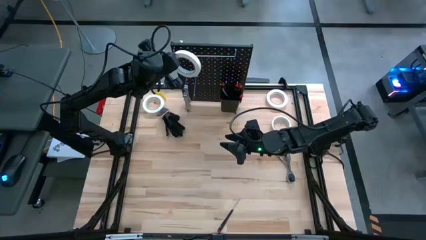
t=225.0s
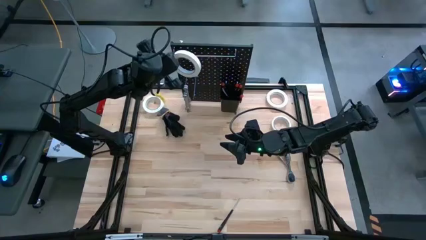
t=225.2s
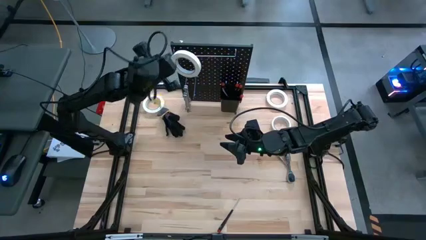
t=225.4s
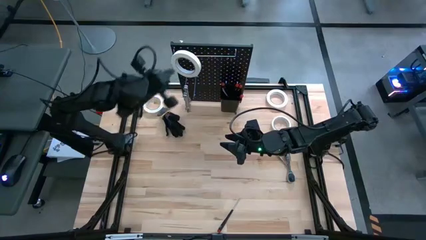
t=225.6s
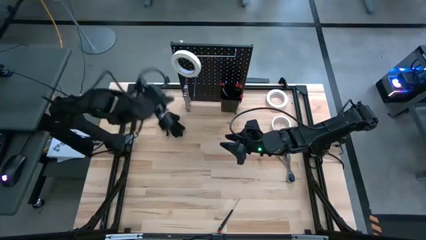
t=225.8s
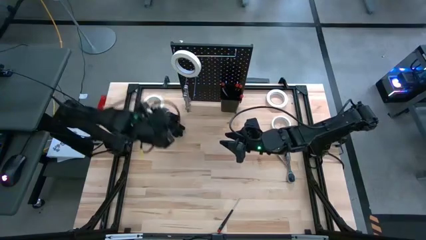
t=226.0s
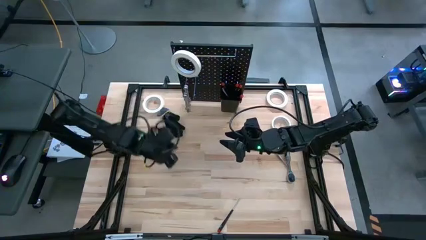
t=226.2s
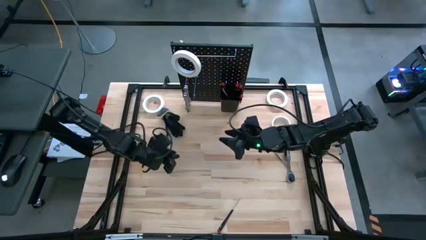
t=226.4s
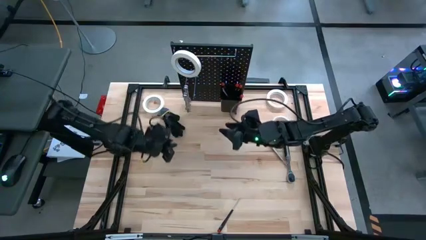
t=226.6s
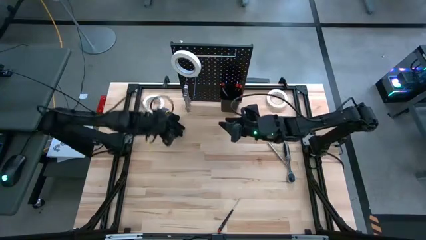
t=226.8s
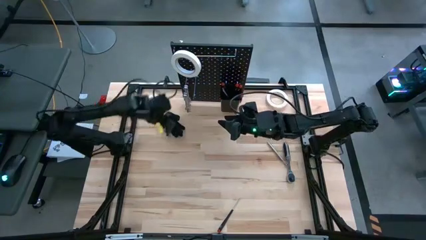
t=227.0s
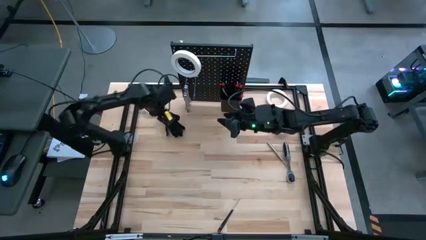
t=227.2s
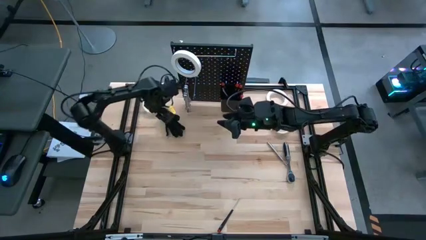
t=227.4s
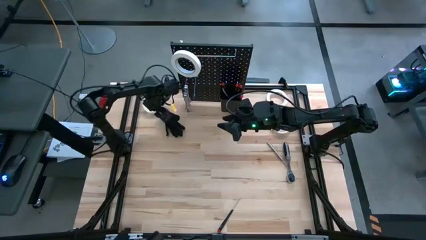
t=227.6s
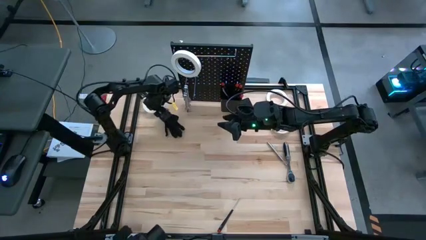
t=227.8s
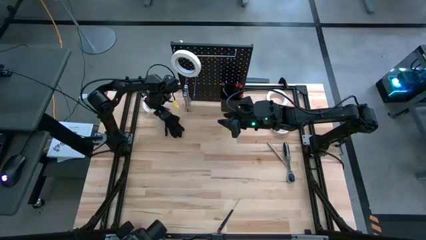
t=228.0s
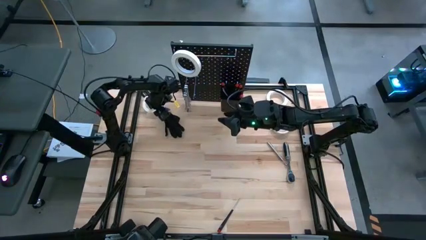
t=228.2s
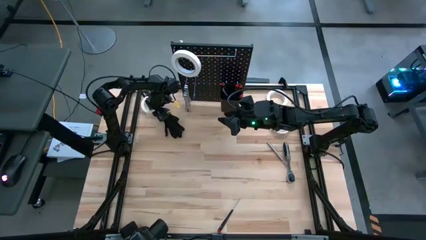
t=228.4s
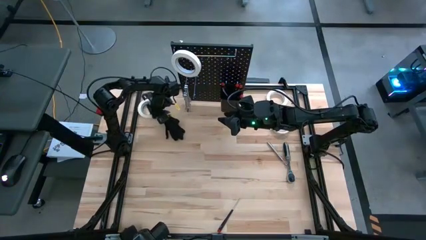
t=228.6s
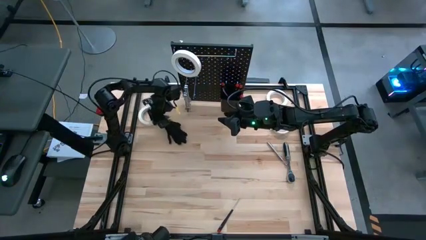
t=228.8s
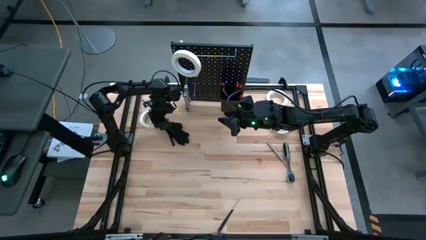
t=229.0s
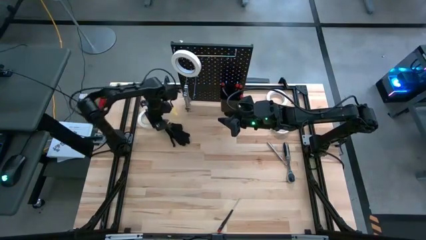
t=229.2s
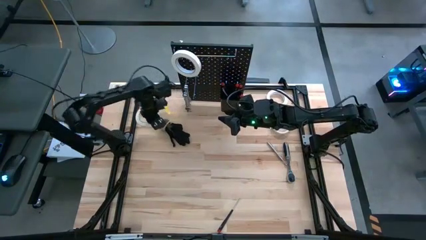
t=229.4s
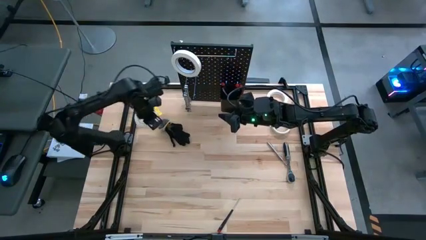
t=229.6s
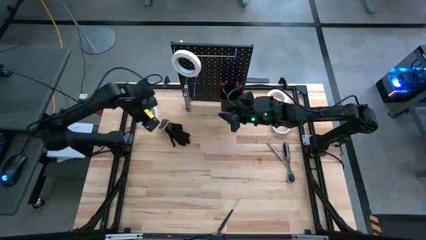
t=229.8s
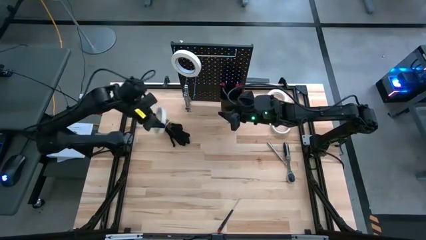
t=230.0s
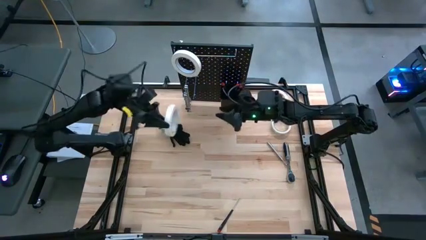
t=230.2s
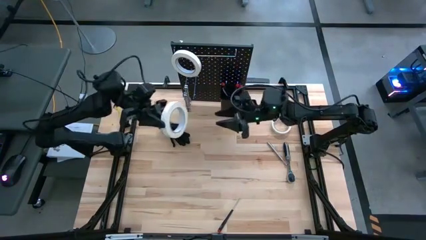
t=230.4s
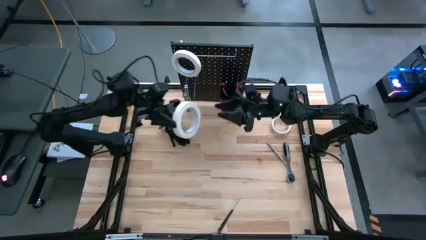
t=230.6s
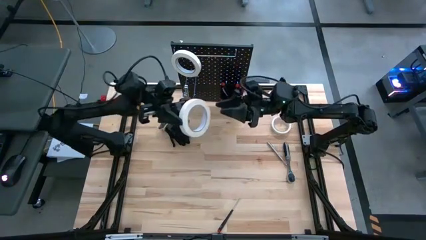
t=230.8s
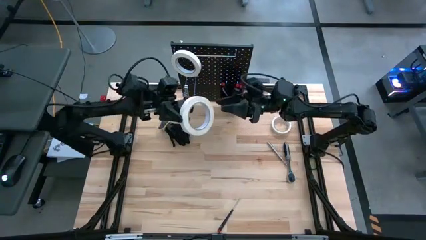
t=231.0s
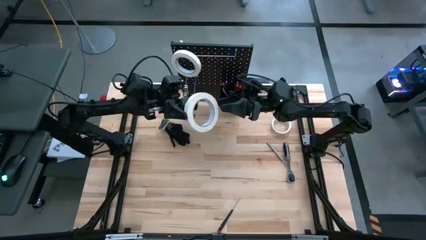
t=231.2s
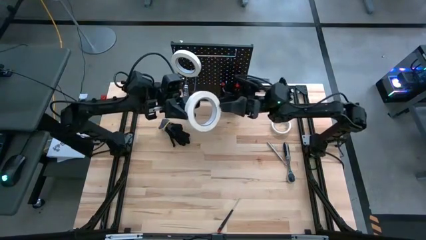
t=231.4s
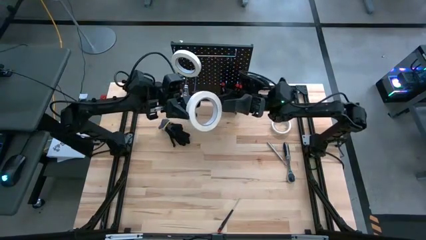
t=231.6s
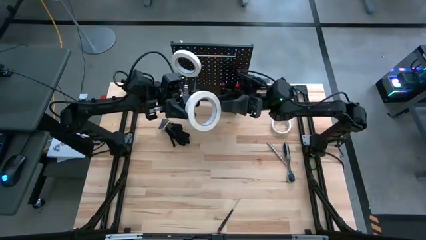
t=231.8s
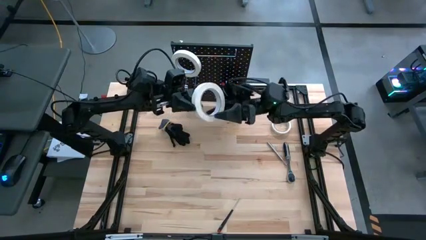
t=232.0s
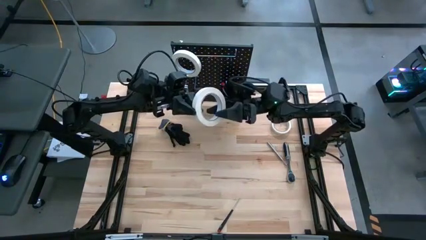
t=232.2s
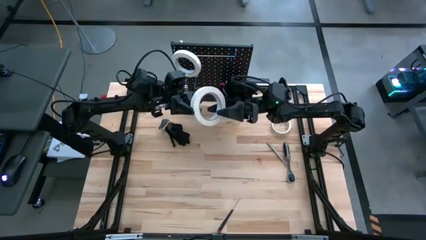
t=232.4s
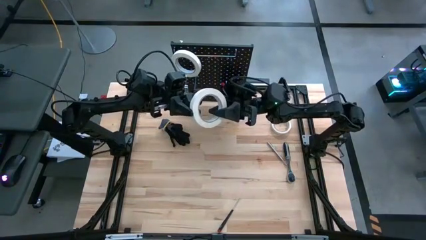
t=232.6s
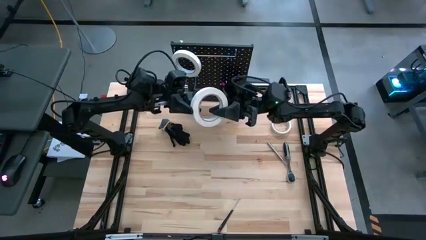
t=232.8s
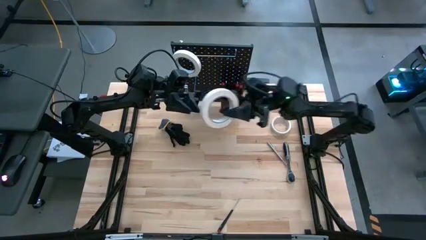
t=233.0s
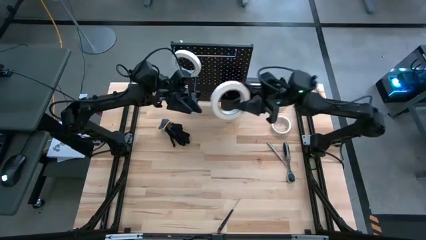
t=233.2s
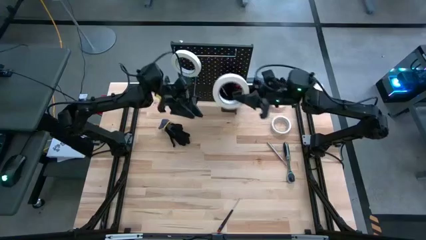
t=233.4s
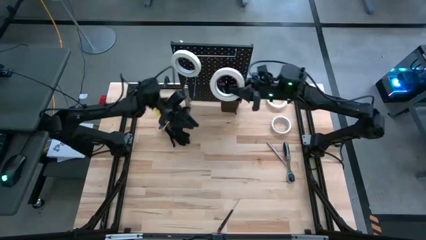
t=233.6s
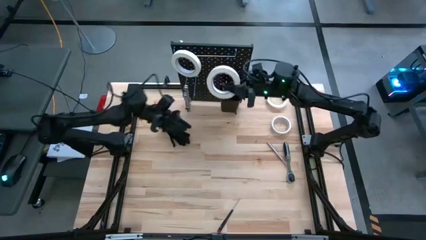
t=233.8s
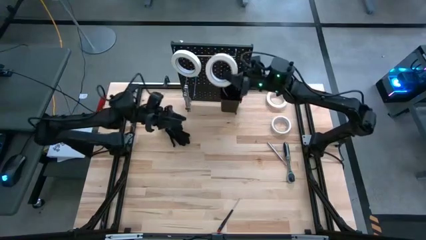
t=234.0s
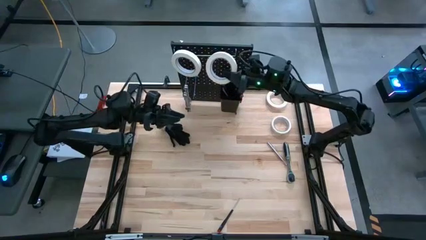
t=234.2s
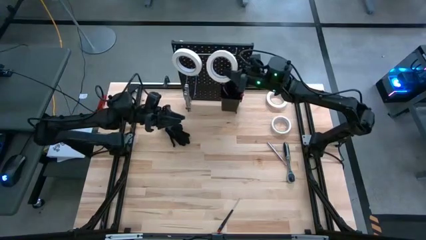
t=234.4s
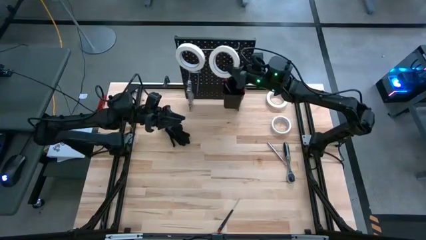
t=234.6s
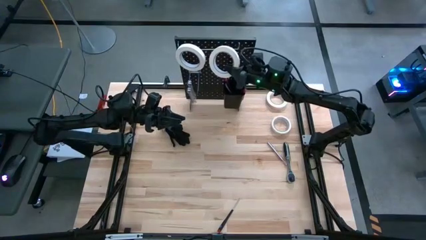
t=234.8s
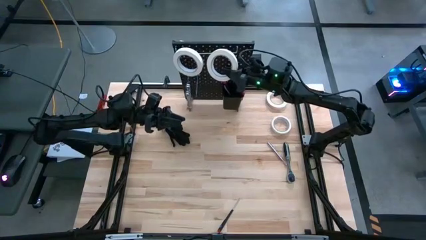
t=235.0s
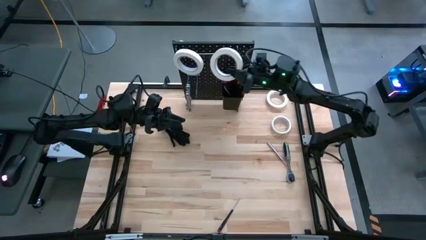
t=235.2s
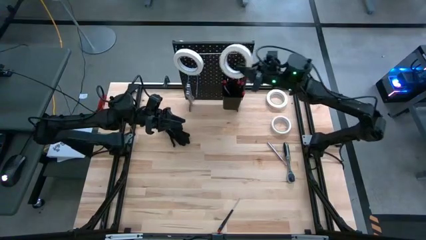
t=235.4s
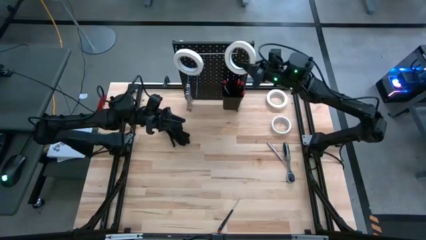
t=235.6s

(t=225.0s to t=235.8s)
Task: Hang tools onto peg board
Hang the white masking tape on the peg board

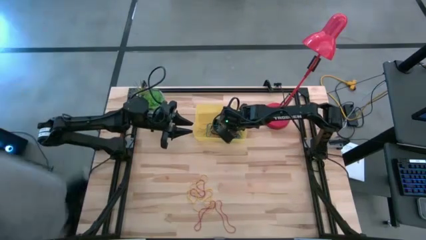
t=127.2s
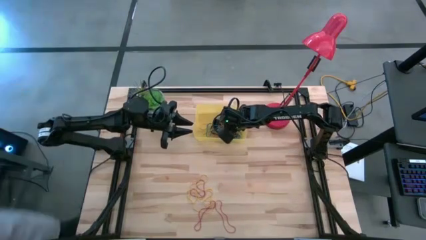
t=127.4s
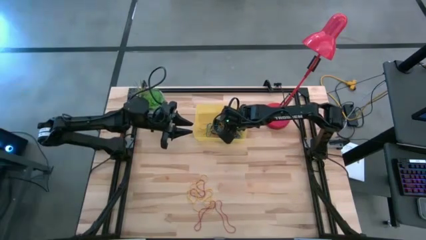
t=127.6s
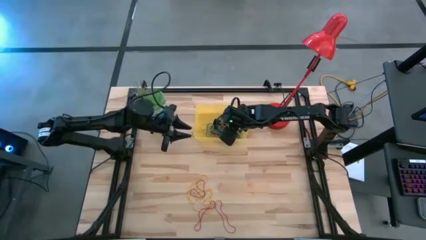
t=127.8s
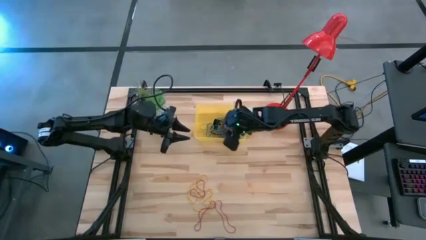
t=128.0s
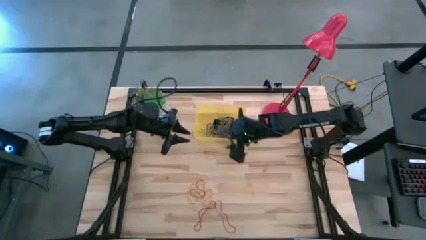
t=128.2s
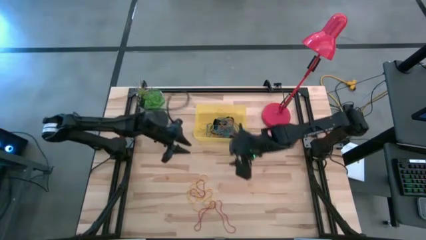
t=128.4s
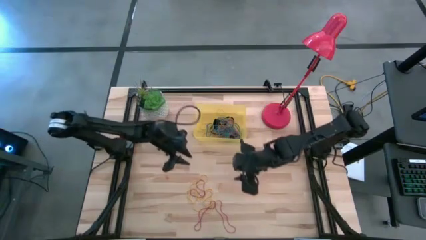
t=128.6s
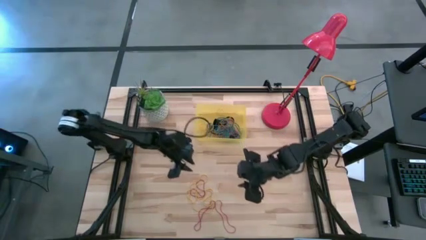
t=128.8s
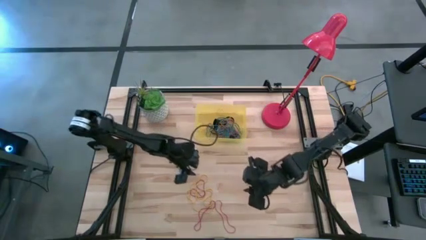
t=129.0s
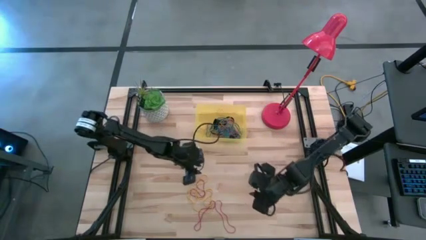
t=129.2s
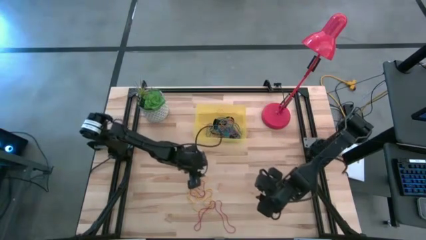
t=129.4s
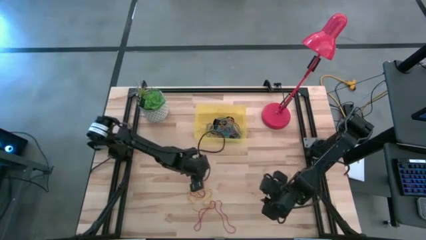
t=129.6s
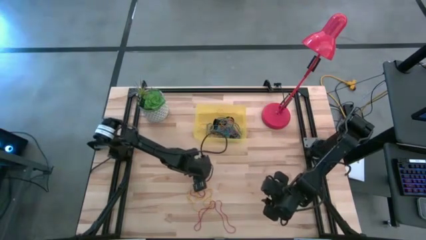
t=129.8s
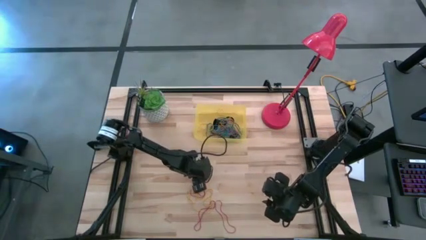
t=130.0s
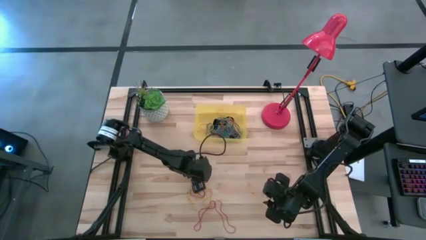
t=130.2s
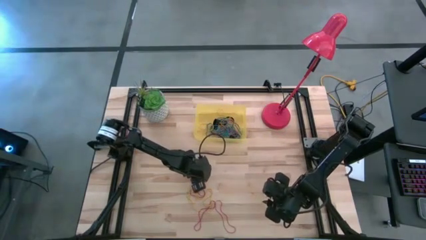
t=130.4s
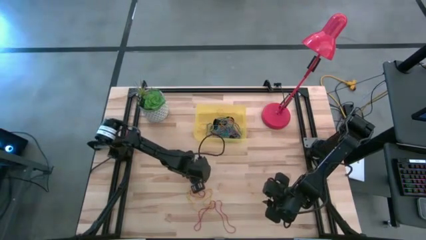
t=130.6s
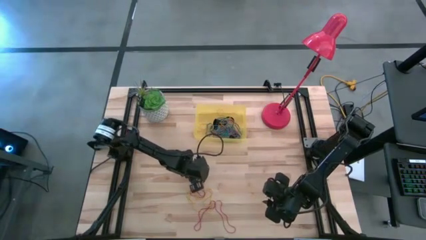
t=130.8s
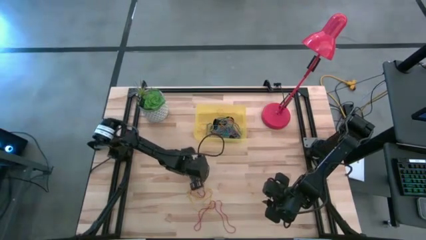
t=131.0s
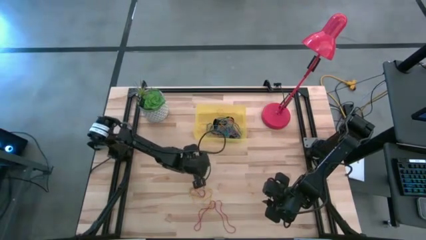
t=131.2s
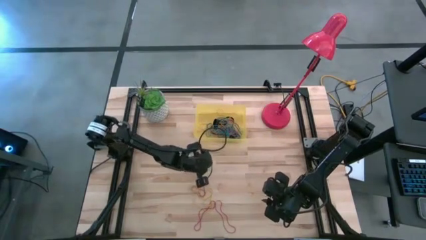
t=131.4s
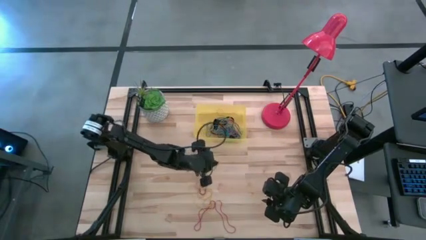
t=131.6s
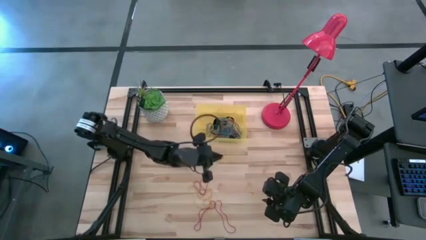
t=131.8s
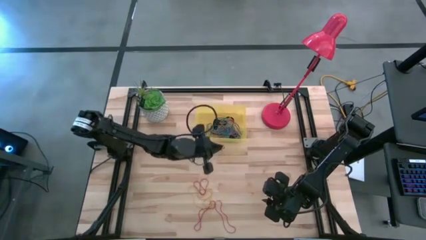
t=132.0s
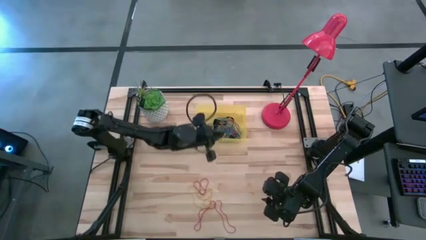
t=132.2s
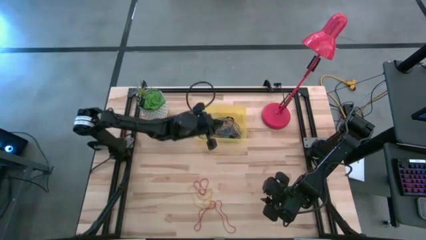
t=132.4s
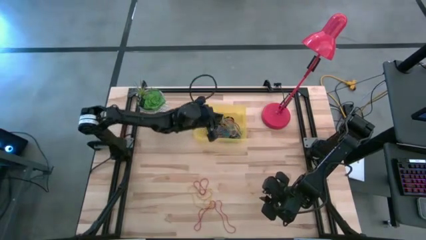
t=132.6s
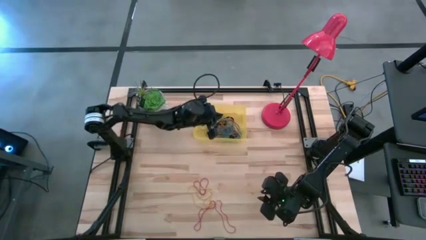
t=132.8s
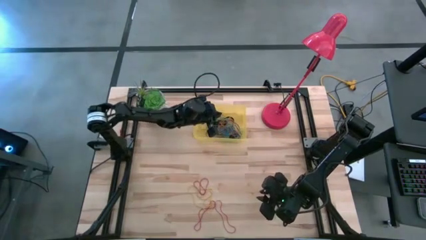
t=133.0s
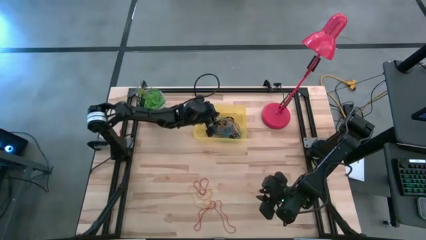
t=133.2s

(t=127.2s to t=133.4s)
Task: Pick and place rubber bands into bin
Put the yellow rubber band into the yellow bin
